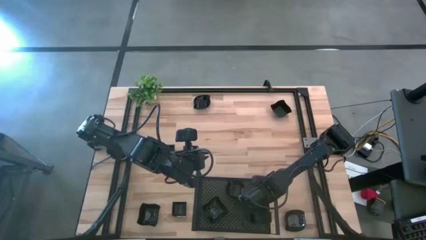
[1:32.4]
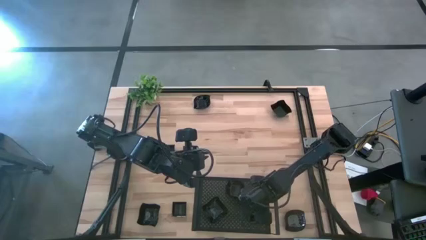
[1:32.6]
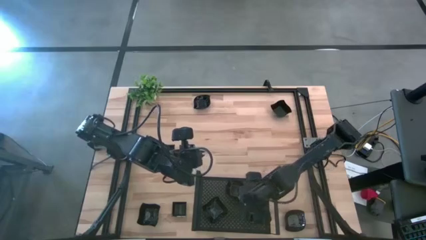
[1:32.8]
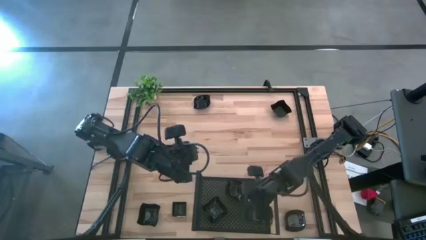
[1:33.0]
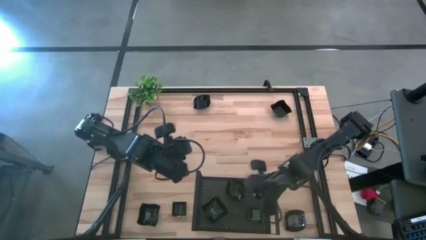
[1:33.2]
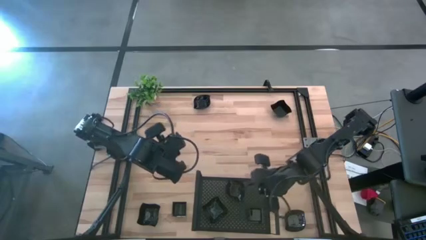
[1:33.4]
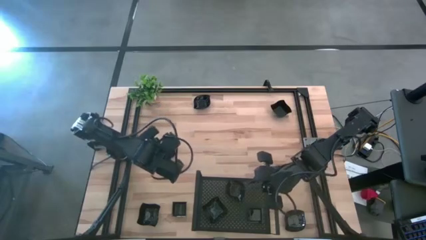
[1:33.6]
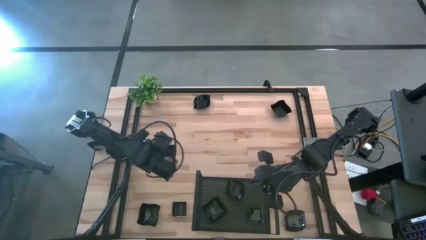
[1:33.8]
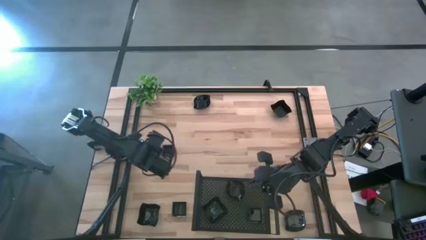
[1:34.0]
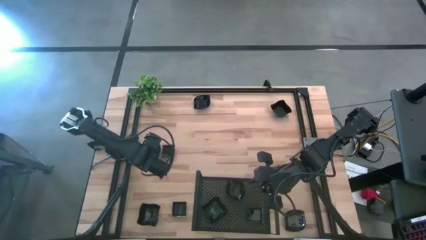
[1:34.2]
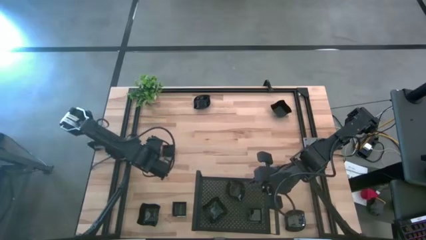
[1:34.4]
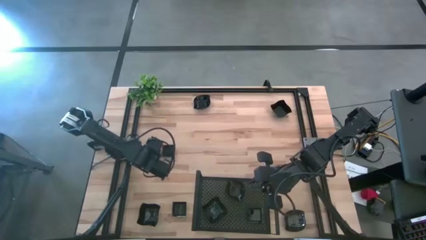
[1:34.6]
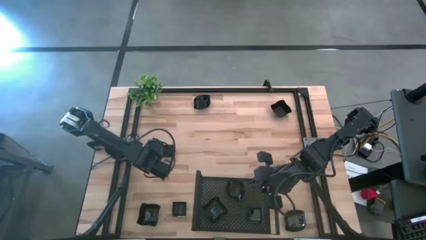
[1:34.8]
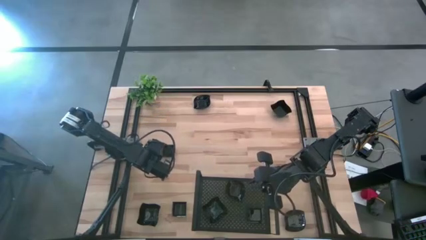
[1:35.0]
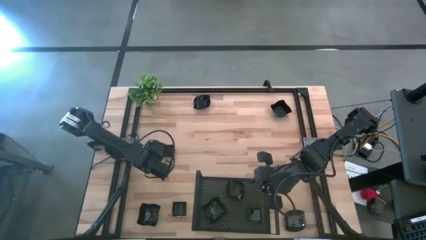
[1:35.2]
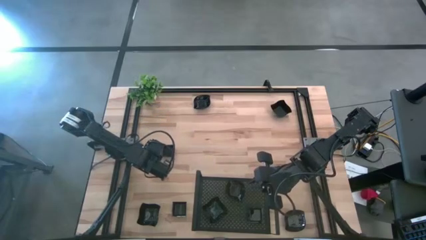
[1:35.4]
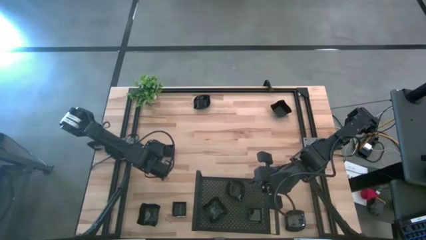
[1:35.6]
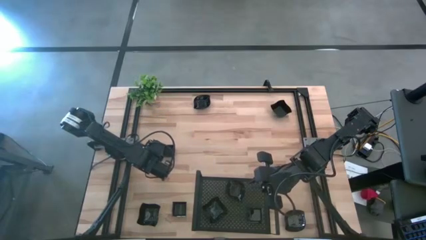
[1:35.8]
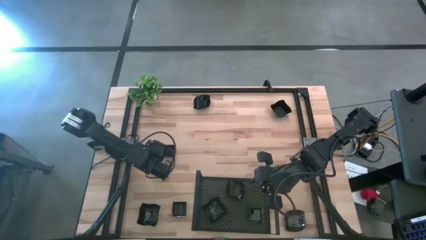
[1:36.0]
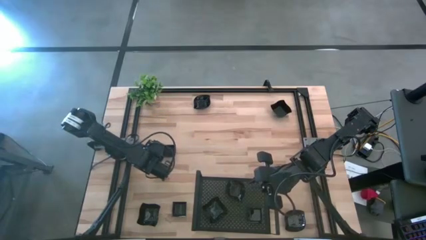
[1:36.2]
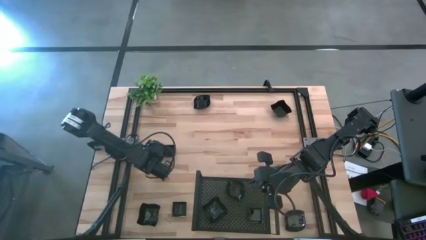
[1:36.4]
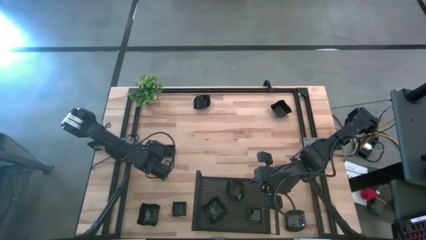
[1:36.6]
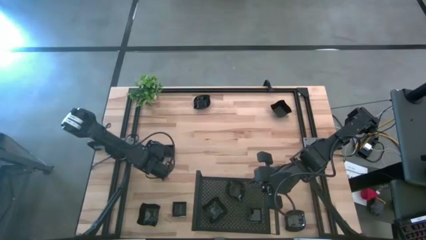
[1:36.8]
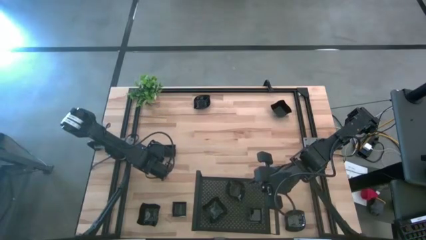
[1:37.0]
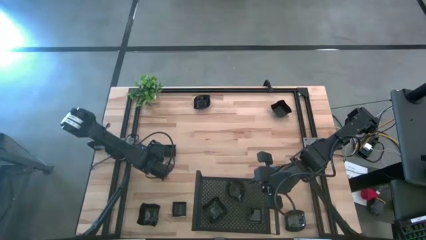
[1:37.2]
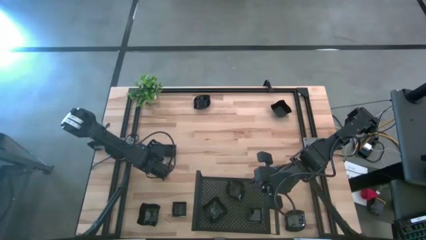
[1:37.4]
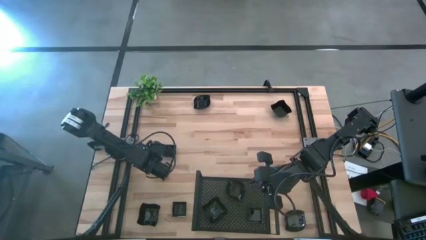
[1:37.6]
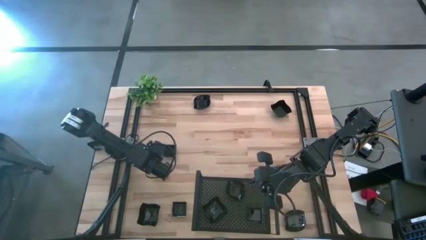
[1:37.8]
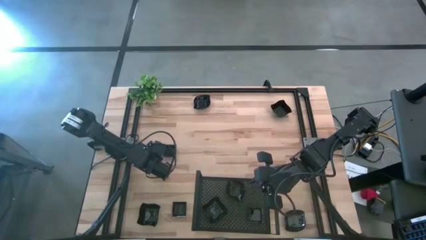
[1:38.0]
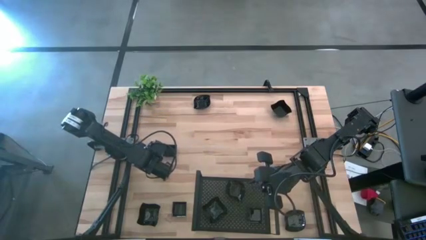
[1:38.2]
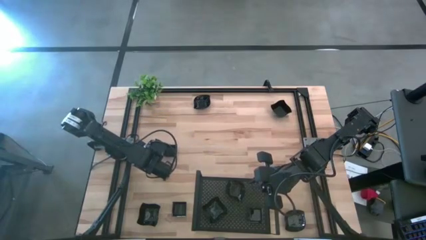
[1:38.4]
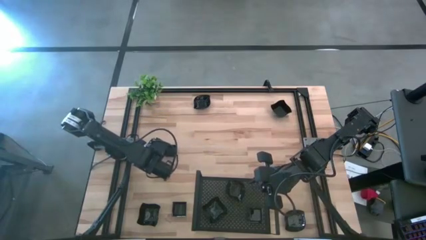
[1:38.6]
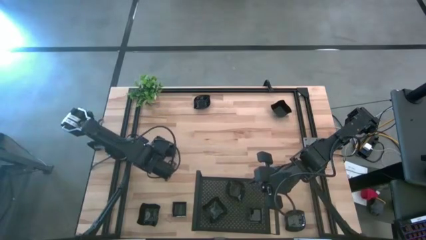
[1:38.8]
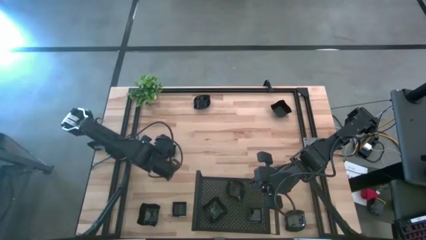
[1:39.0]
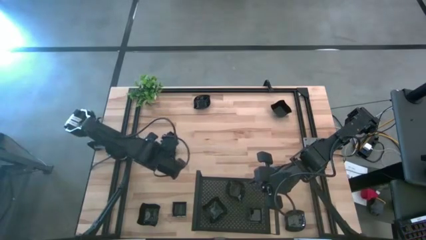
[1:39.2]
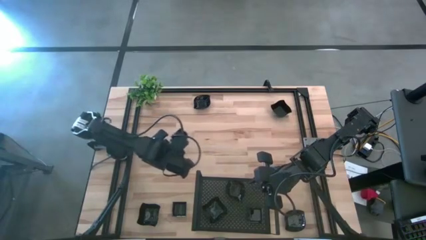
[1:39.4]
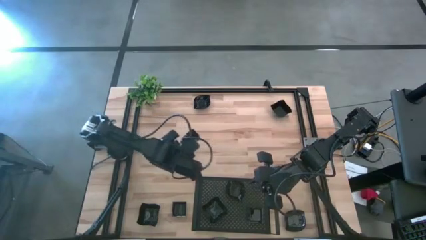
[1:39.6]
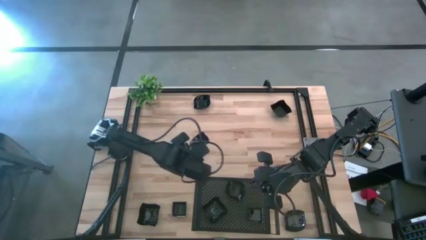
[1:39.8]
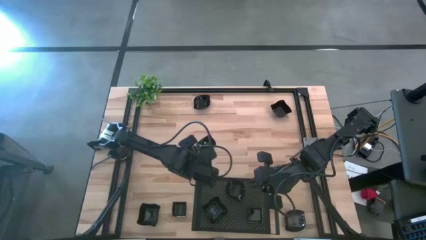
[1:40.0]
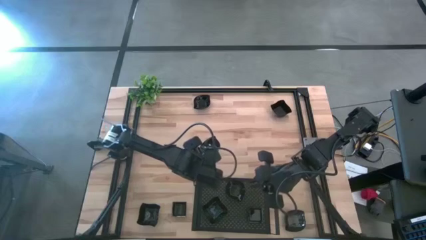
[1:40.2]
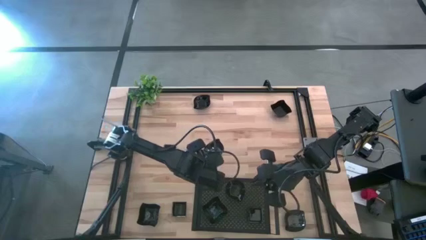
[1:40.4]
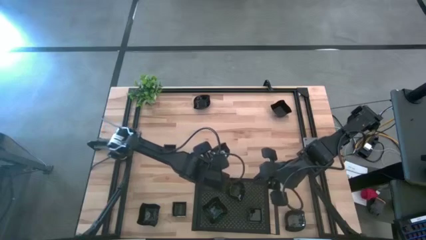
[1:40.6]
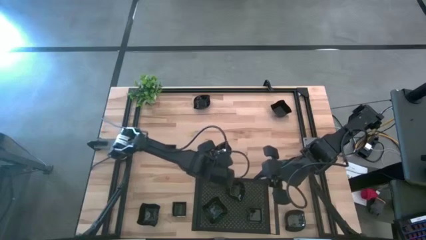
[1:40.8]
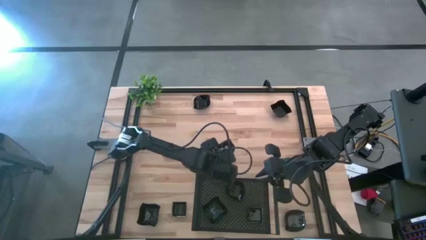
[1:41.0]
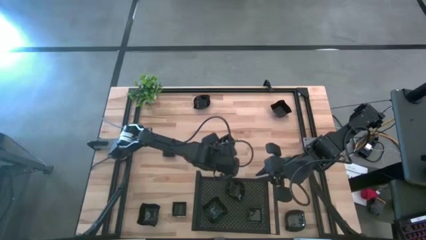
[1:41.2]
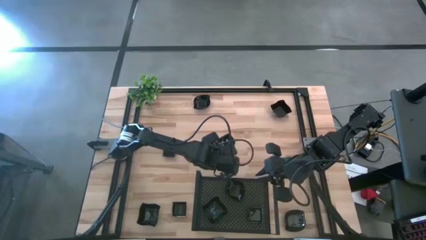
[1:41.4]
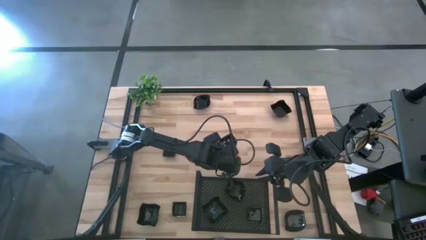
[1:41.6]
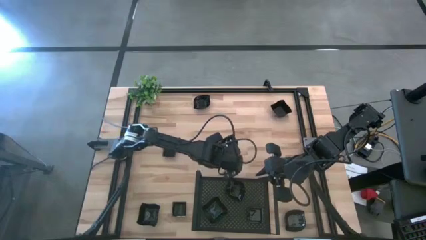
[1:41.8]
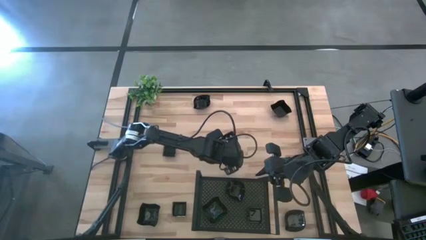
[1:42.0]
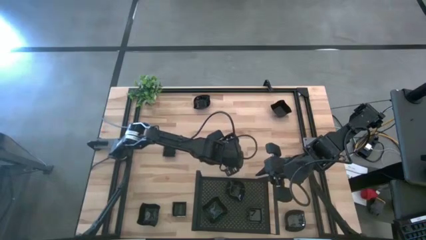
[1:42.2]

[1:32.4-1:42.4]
Task: Pick & Place Mini shaped plates
Stack the leaf shaped plate on top of the other leaf shaped plate on the shelf

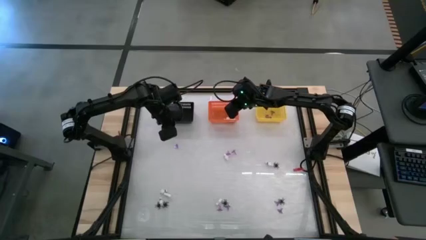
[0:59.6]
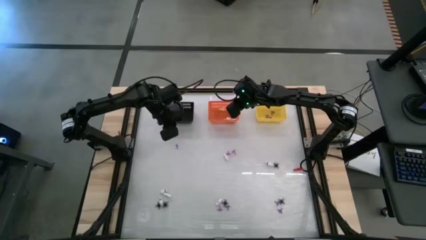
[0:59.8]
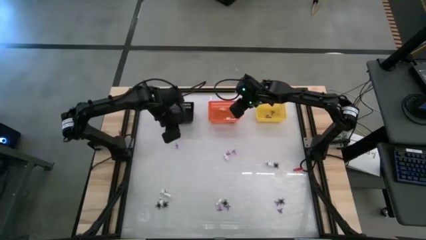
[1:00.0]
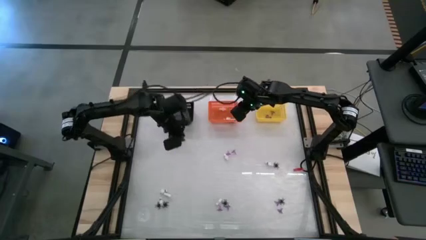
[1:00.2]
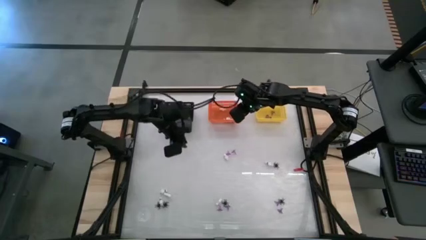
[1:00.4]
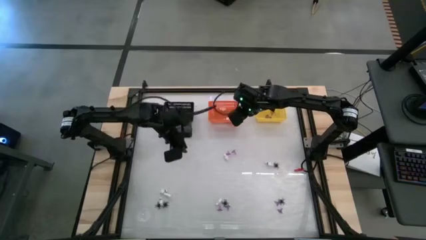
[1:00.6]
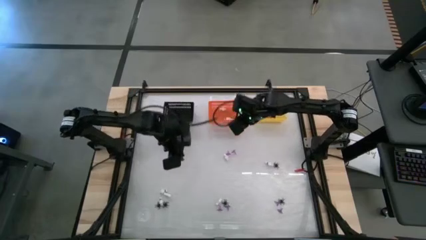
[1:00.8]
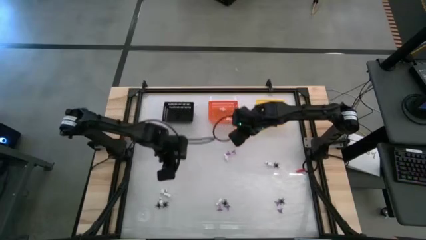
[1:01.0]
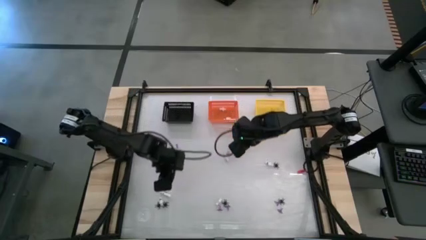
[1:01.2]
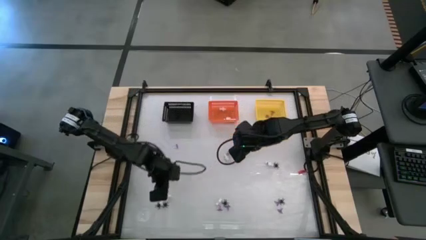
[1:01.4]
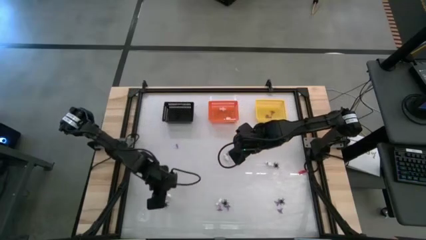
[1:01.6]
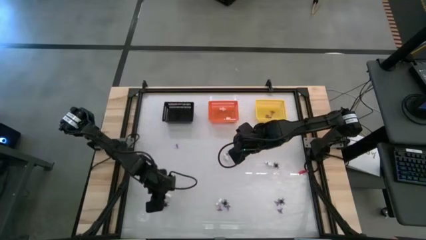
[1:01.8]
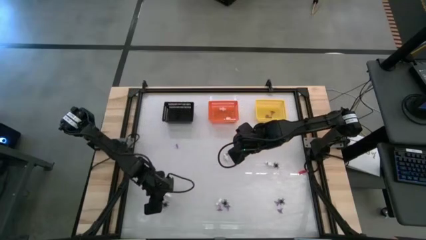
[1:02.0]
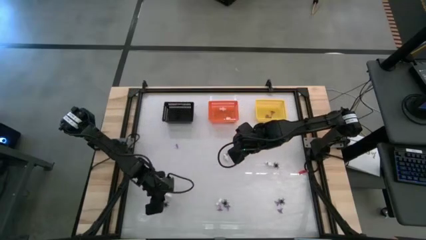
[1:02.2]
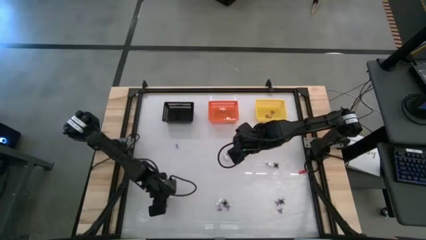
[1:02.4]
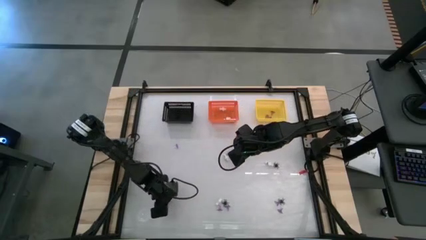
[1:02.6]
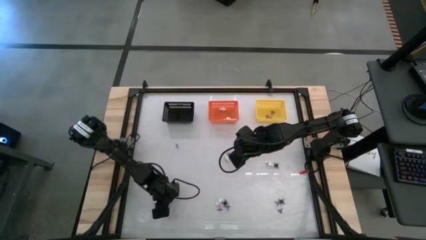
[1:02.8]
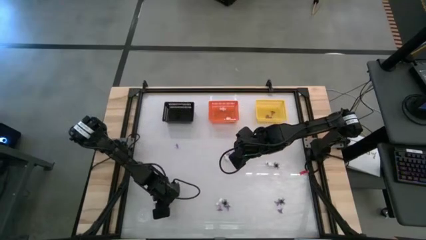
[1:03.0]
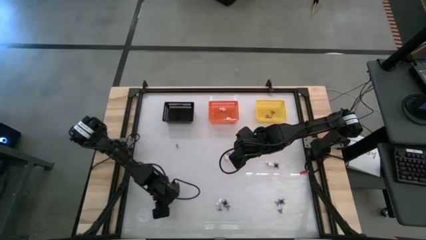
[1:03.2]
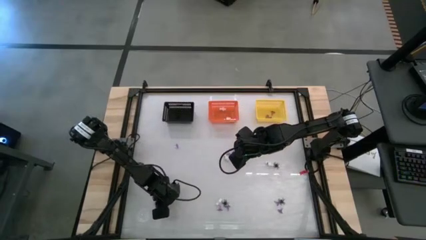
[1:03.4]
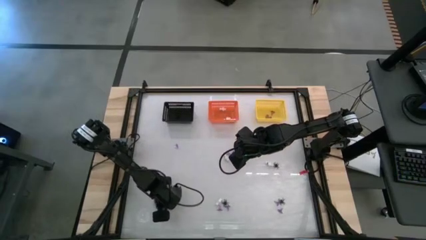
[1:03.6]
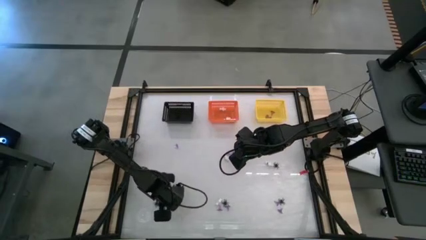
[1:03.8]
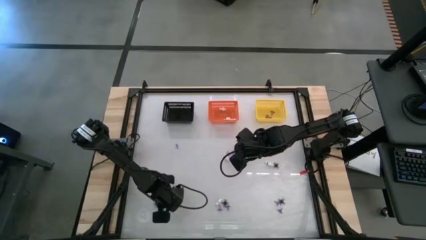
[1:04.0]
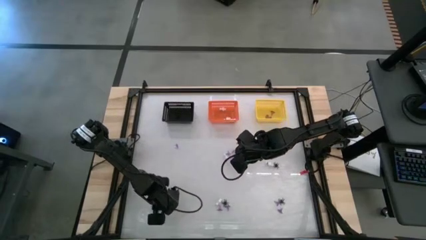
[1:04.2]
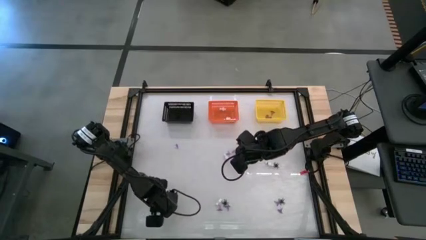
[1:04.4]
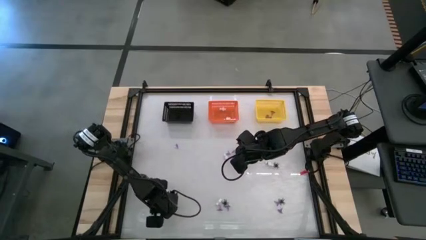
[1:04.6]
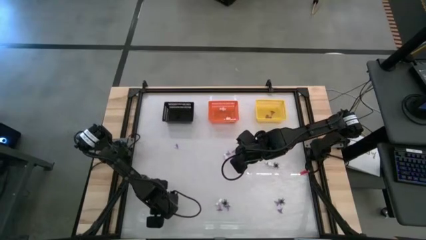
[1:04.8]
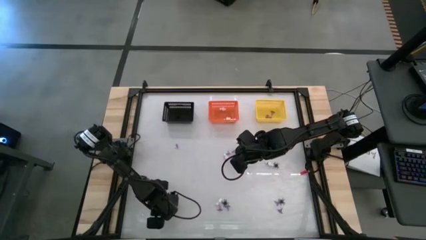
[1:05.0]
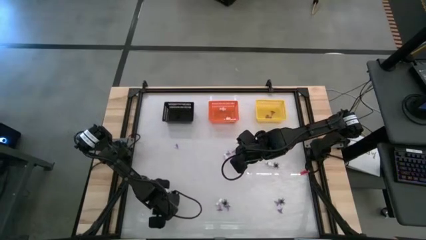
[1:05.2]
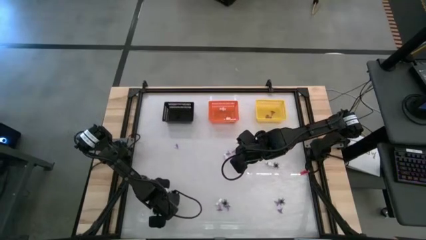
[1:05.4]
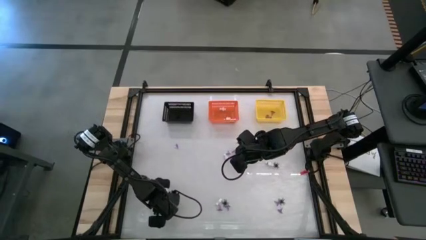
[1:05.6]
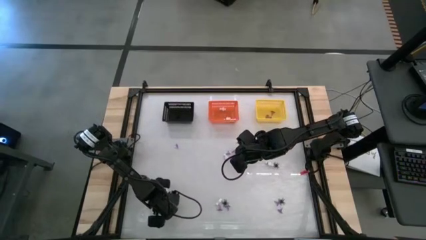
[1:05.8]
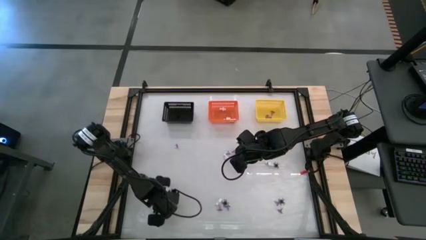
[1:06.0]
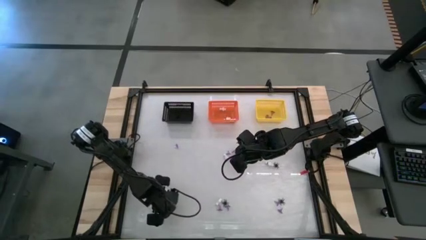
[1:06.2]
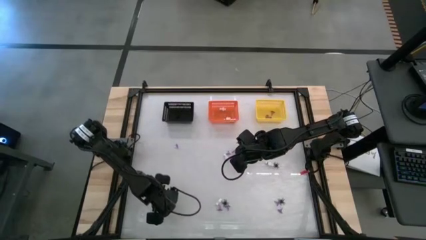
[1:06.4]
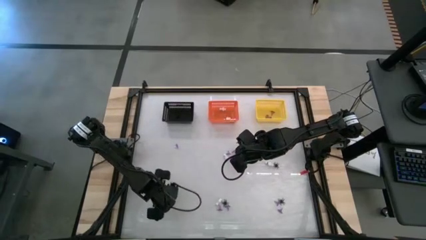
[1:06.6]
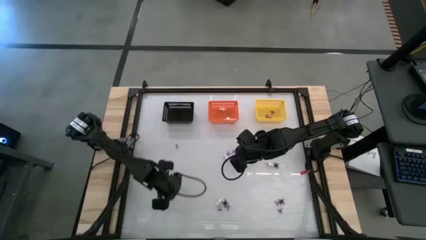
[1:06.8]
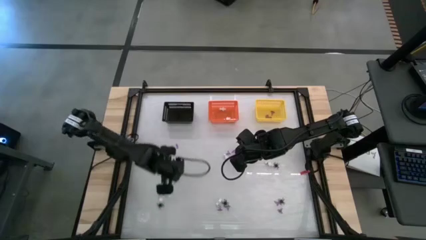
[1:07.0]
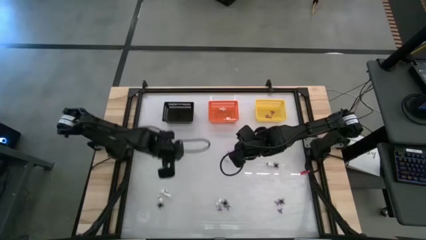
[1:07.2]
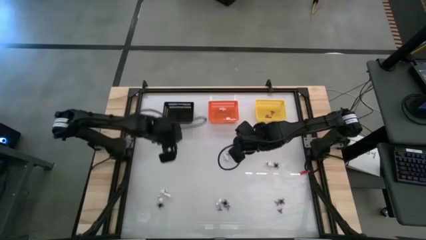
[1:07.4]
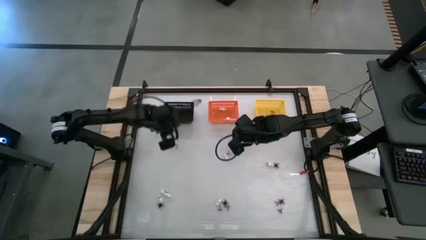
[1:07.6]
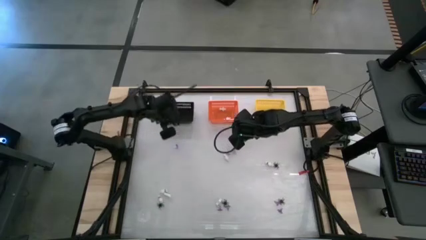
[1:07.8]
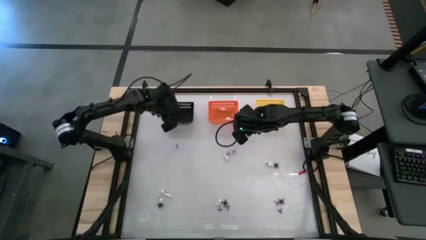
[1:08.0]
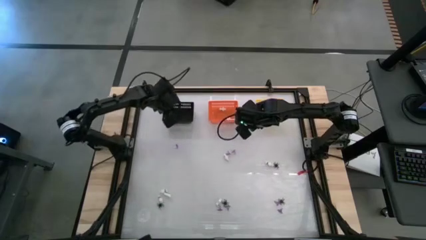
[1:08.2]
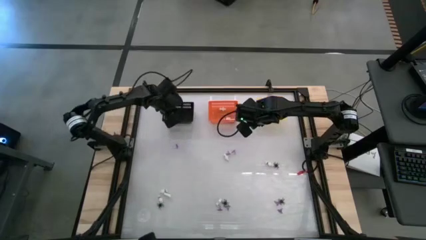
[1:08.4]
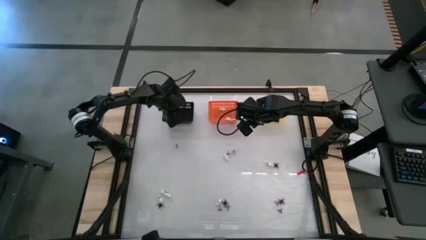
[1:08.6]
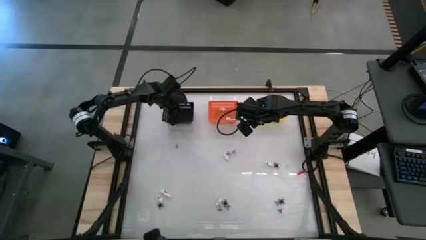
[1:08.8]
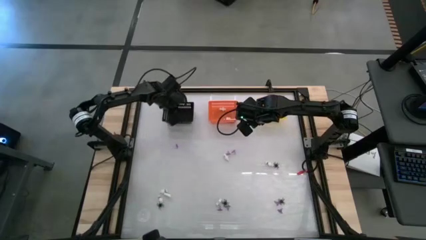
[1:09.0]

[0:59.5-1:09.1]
Task: Sort Halloween decoration
Put the spider toy in the black bin
